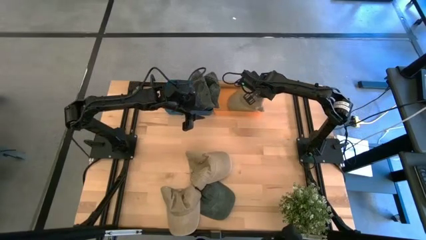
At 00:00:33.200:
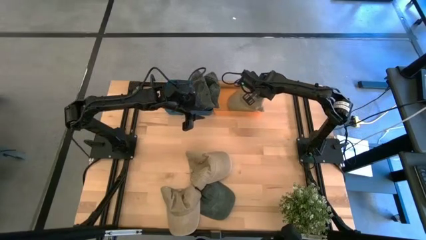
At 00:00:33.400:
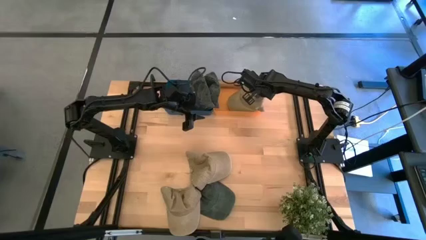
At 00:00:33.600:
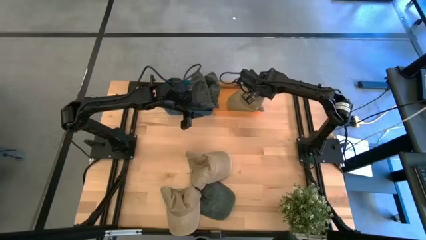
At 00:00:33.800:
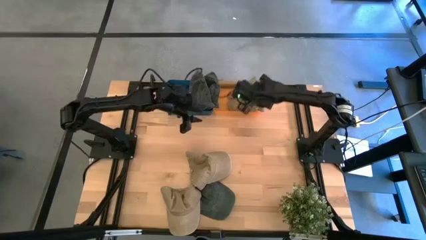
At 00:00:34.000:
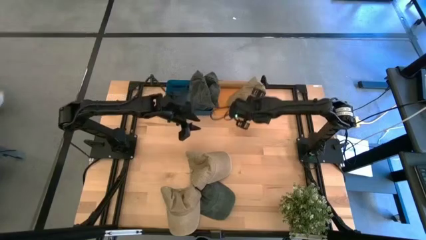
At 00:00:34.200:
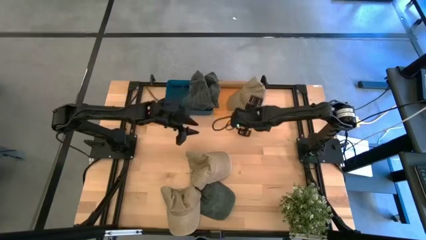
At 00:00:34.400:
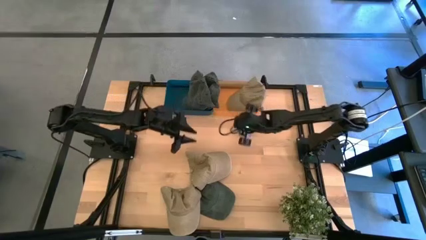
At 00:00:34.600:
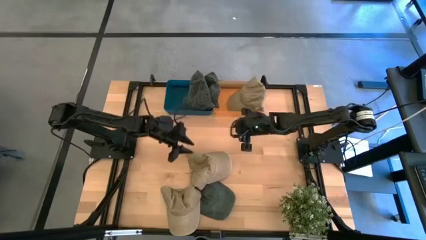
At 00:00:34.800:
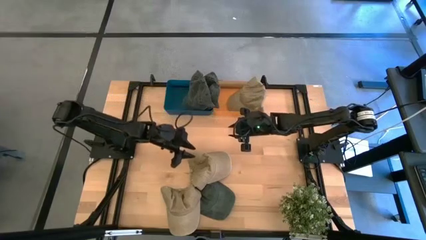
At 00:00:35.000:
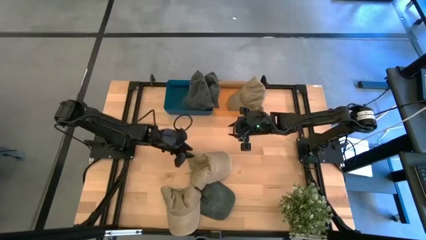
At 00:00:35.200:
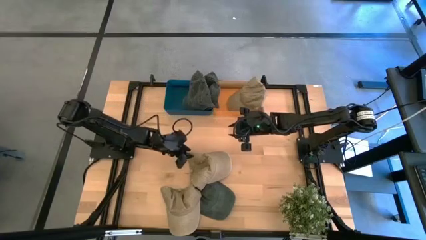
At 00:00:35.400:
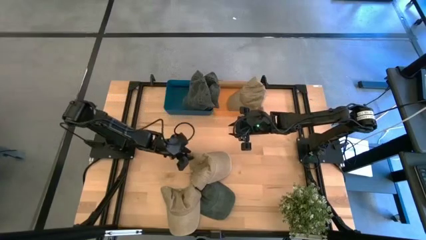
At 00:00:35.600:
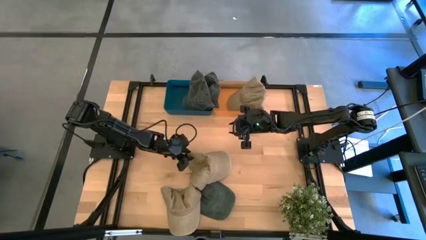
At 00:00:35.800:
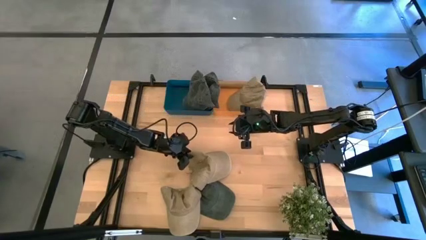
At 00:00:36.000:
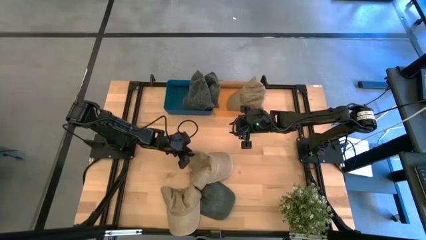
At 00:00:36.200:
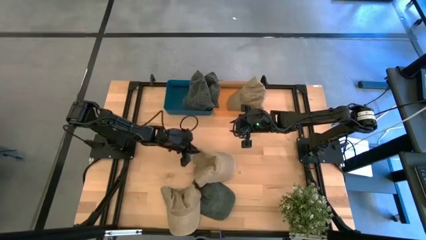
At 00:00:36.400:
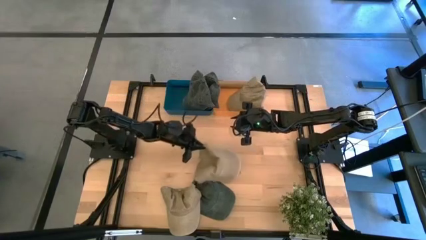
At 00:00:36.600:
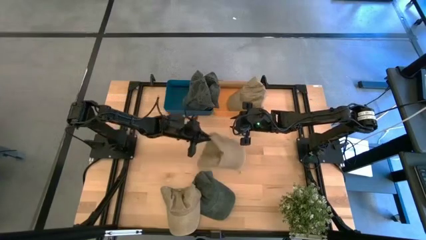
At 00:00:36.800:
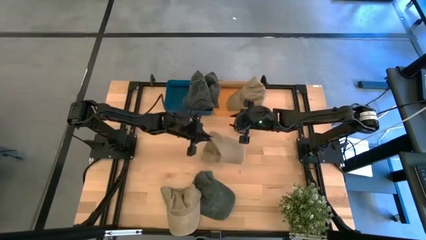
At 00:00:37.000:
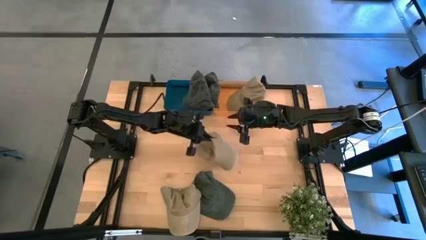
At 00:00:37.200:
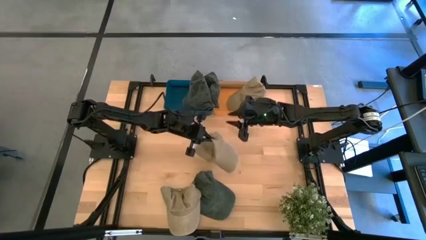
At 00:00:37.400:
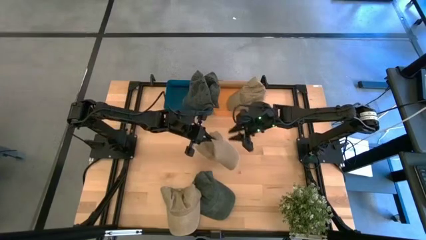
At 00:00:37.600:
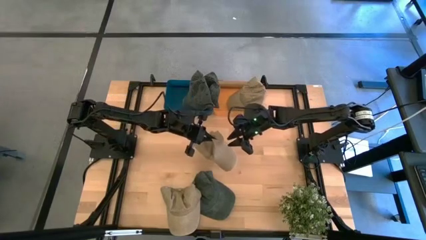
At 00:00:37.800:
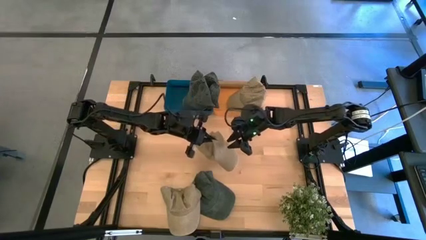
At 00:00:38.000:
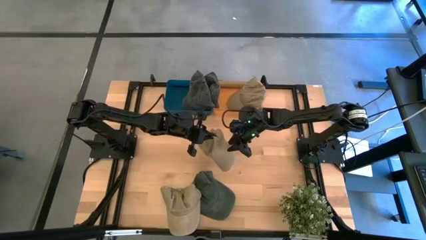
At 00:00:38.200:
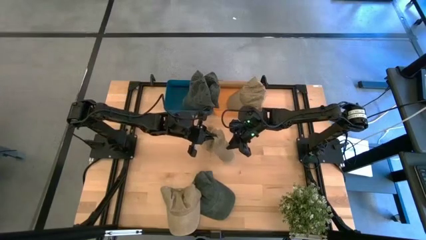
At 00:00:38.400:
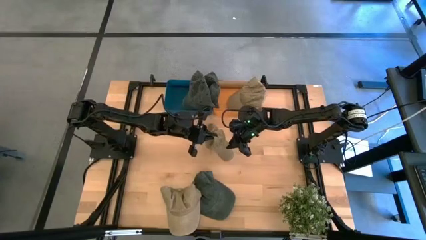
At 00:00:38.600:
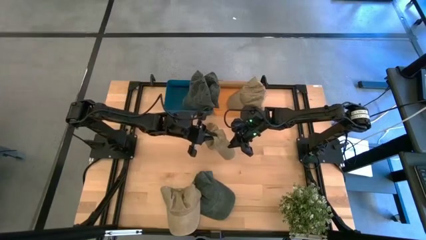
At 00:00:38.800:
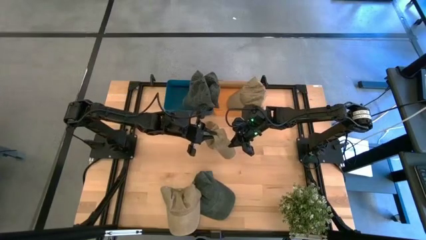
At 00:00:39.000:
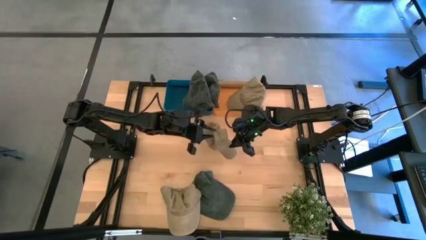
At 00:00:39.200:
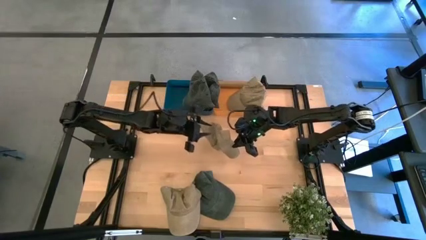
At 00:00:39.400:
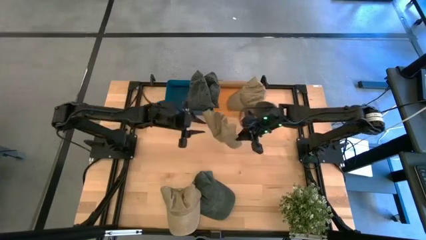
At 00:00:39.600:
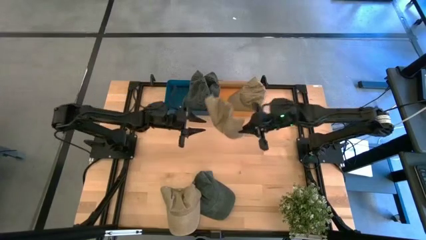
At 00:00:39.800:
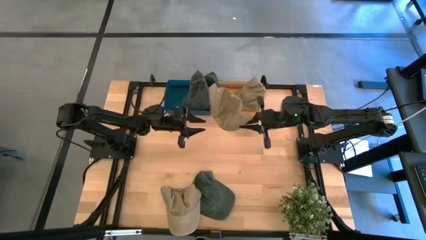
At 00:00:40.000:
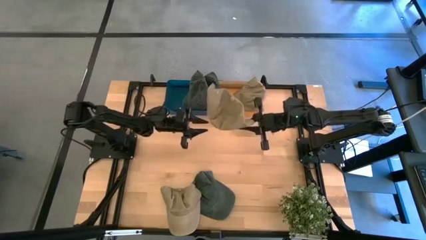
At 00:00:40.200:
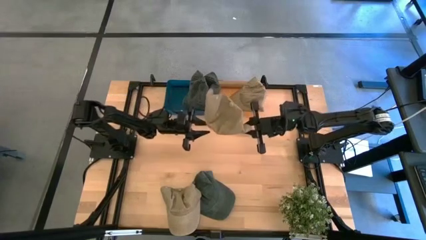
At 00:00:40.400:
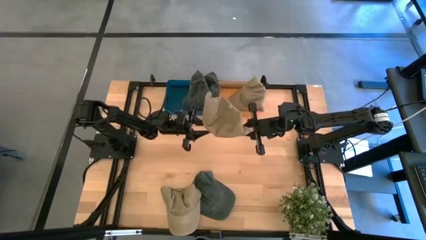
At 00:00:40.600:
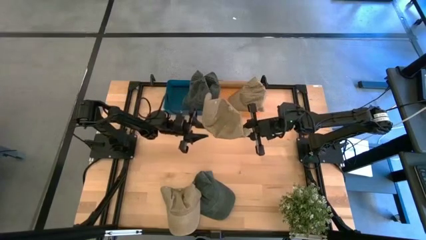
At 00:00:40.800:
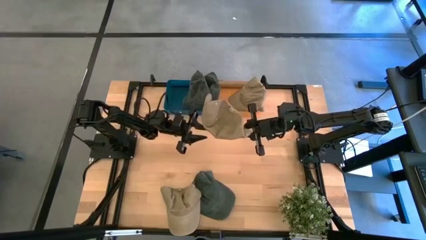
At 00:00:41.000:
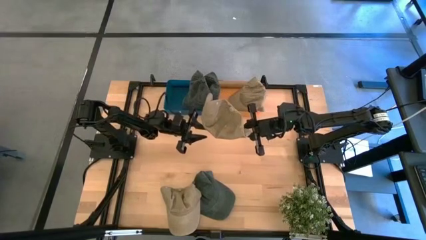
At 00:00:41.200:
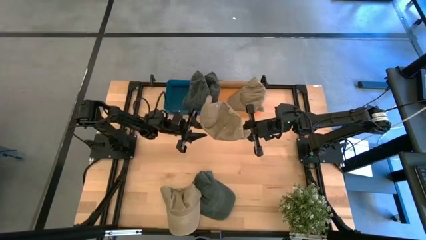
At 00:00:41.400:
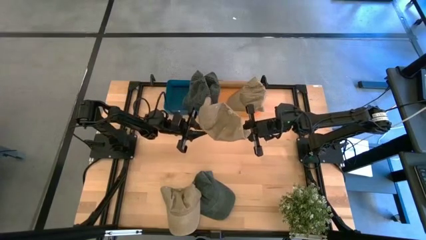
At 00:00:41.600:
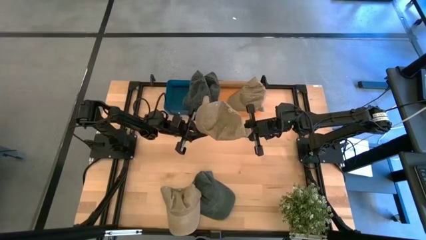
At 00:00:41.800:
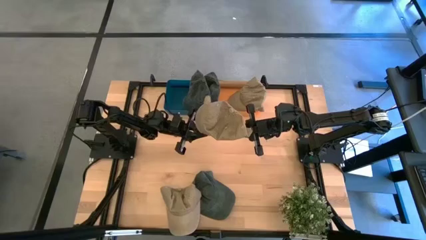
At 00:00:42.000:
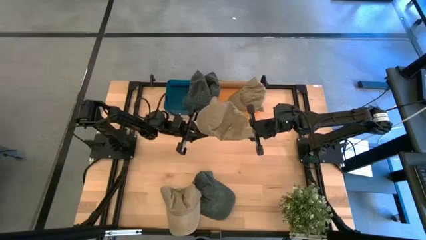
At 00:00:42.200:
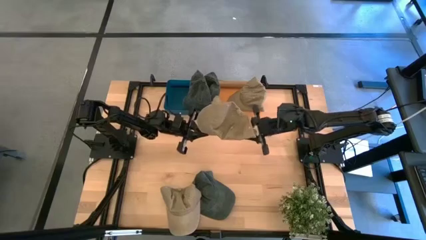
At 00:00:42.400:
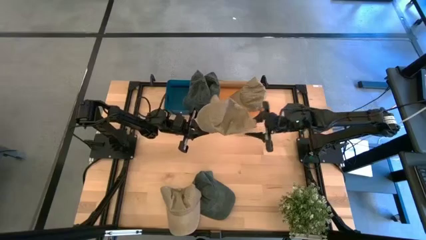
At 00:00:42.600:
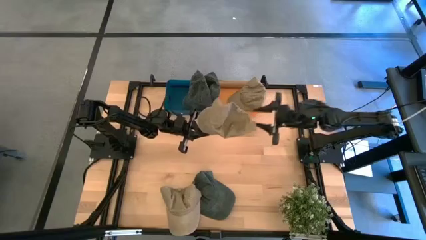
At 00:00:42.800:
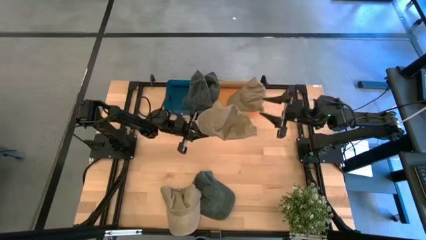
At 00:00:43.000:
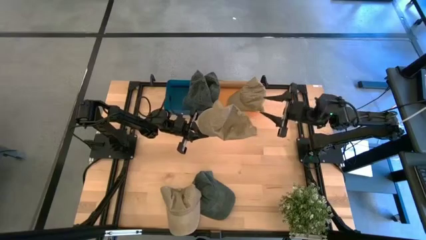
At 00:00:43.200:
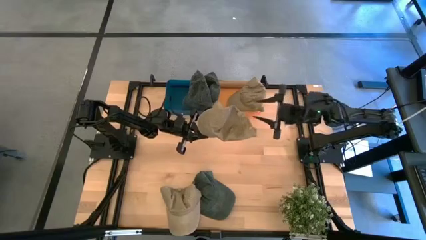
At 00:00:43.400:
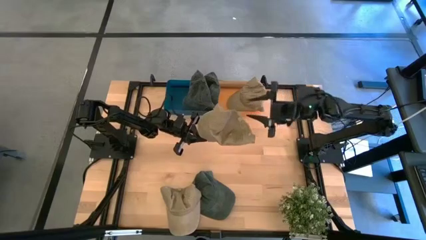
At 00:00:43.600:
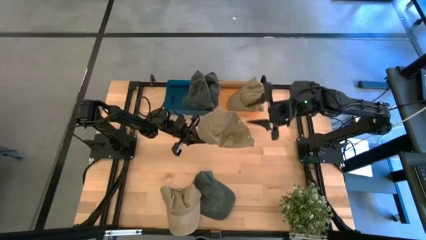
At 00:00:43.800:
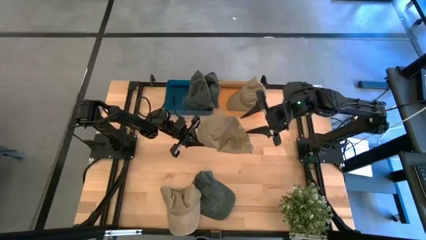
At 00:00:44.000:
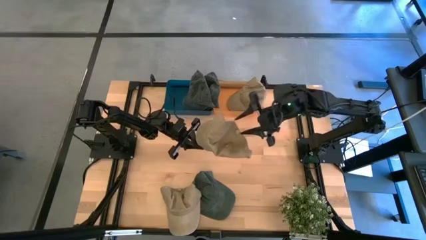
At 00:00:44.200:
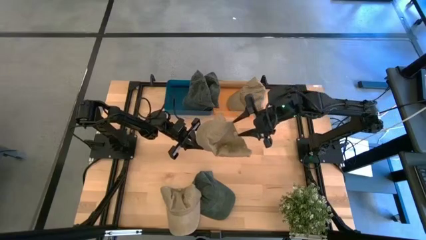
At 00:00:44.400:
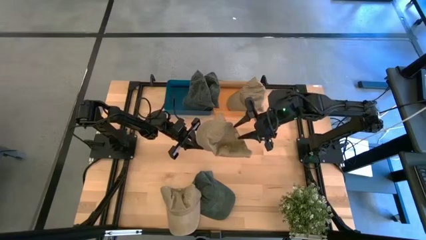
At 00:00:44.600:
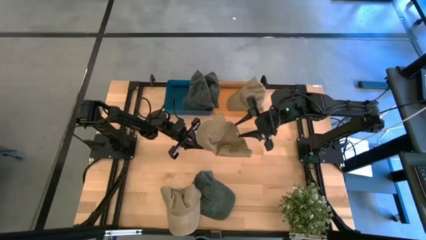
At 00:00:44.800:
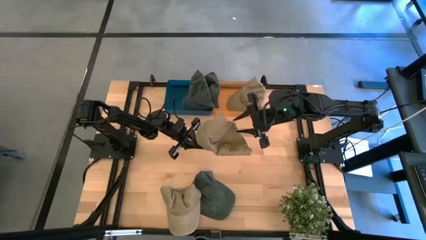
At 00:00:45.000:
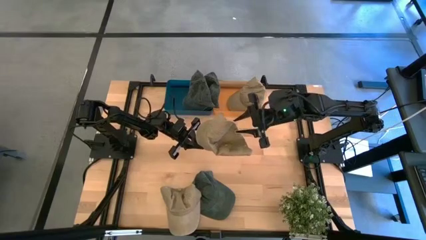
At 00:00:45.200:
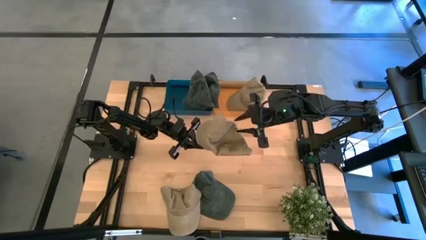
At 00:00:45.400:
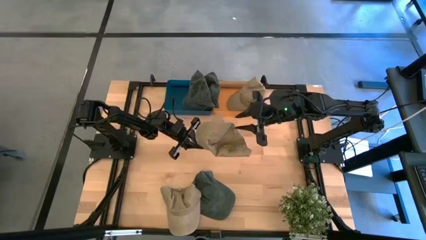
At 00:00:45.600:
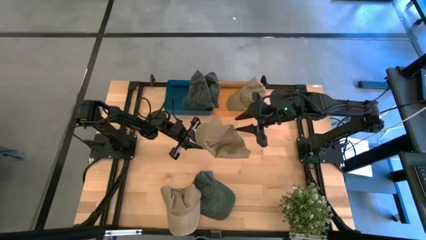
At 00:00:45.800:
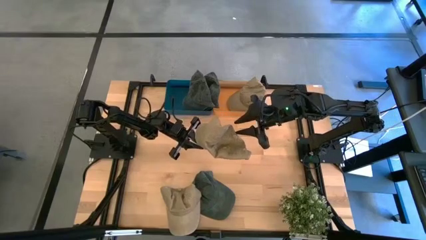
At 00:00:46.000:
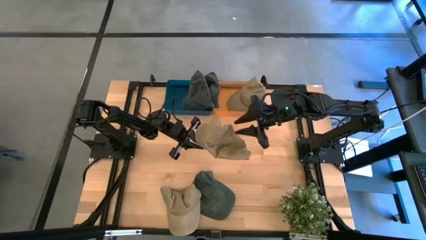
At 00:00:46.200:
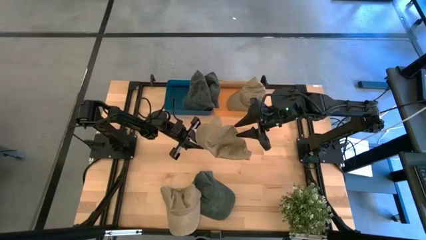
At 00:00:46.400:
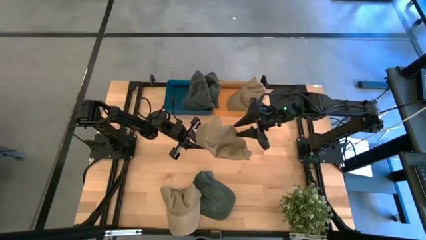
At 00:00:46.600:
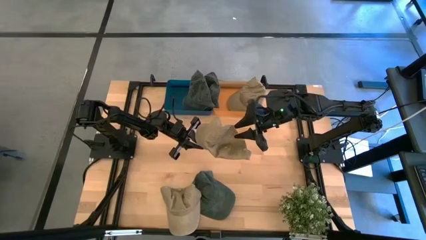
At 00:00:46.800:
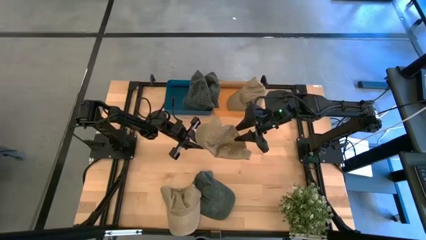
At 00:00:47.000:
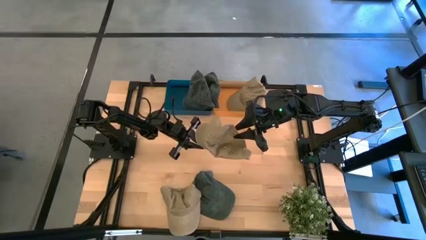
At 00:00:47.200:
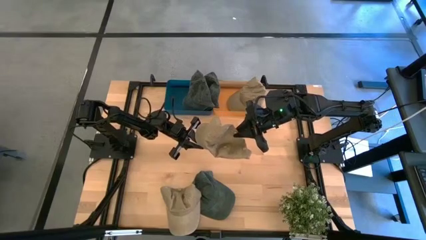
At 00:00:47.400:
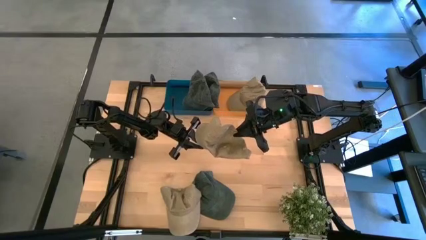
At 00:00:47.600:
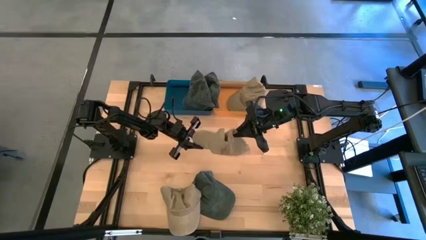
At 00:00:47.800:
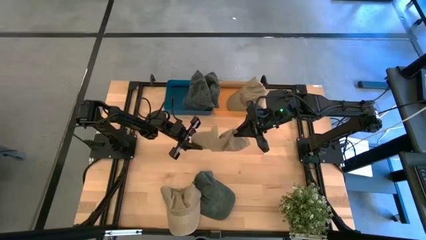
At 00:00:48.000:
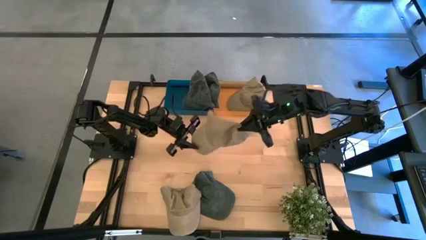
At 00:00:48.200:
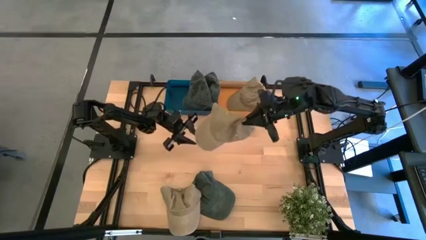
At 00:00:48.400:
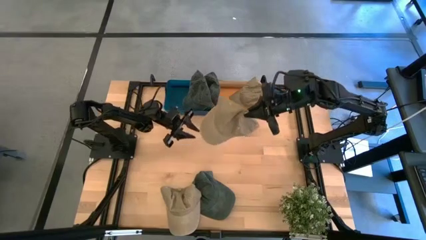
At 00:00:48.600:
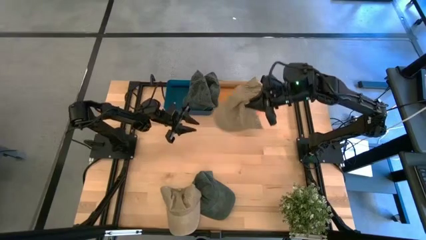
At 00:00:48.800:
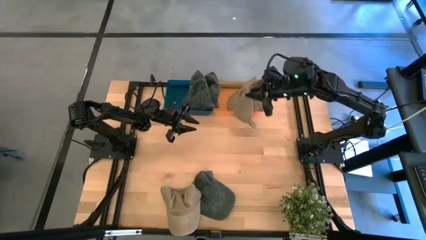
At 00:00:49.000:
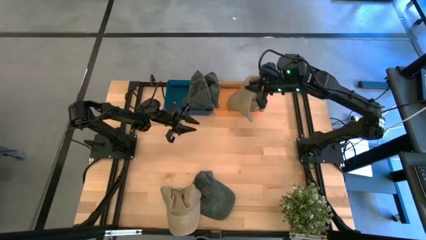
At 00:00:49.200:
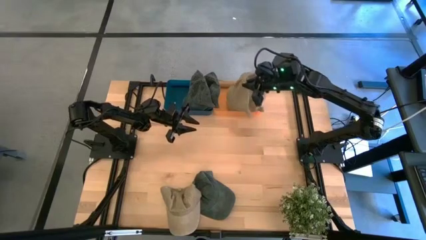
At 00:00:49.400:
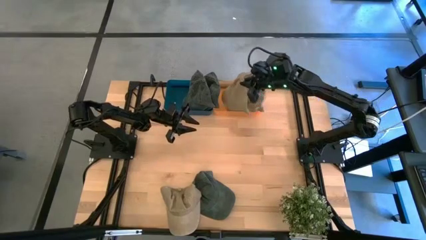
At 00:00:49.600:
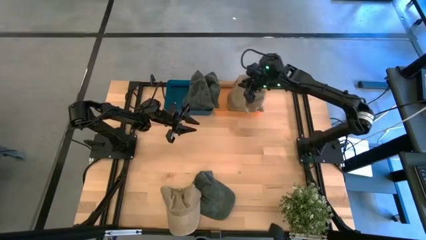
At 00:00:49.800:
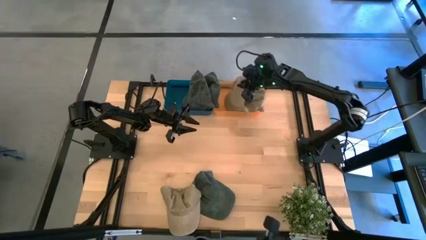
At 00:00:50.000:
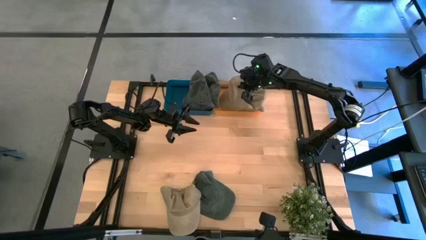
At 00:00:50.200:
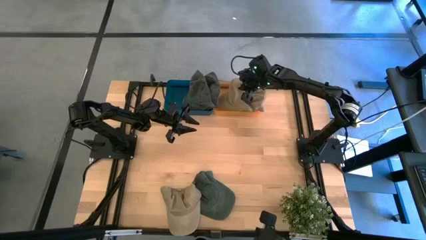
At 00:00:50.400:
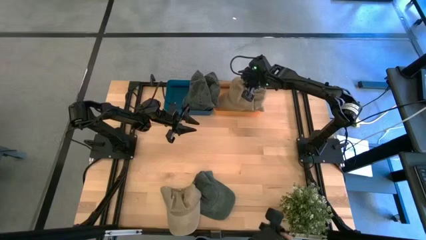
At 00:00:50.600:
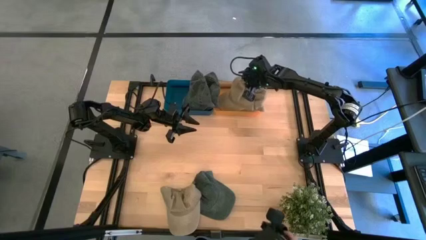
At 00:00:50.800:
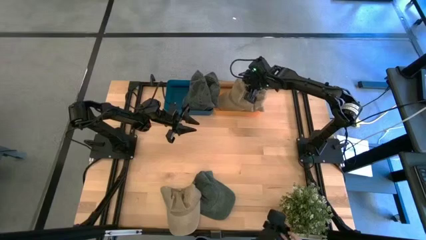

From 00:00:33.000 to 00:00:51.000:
Task: Pick & Place hat
Put the top brown cap into the orange bin
